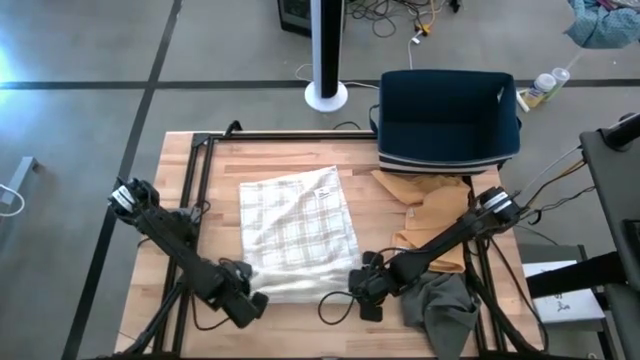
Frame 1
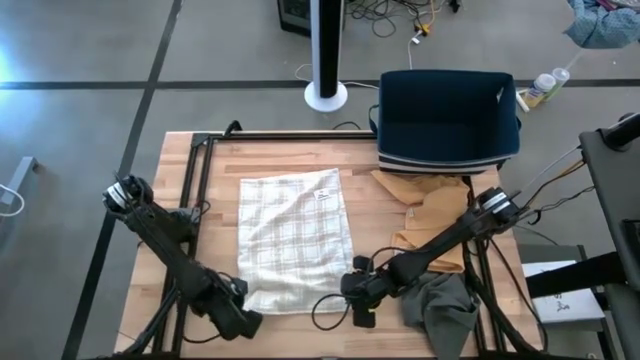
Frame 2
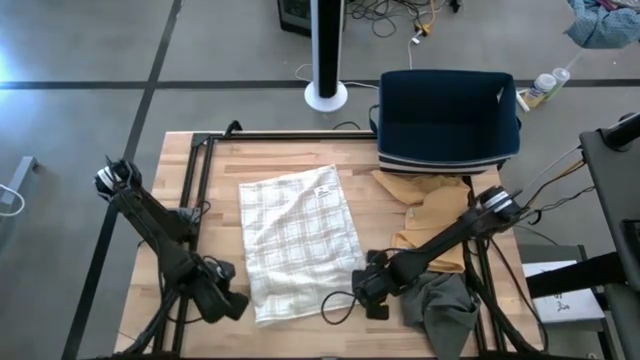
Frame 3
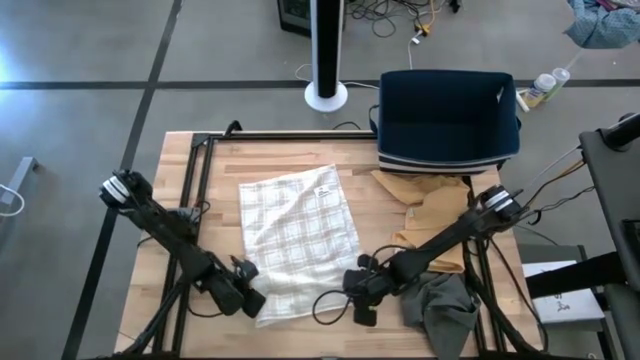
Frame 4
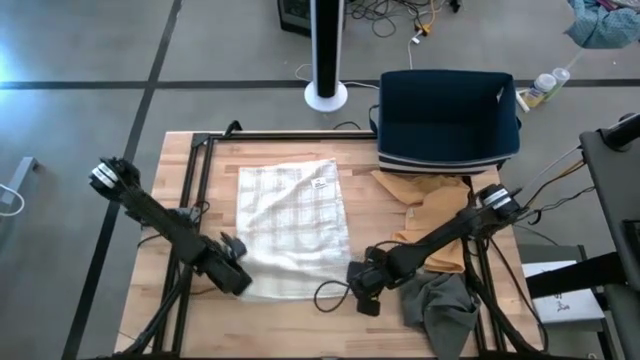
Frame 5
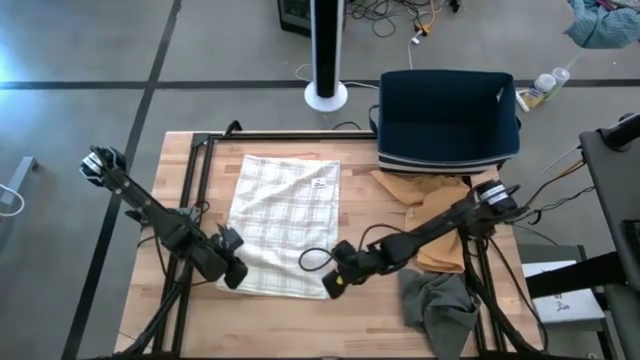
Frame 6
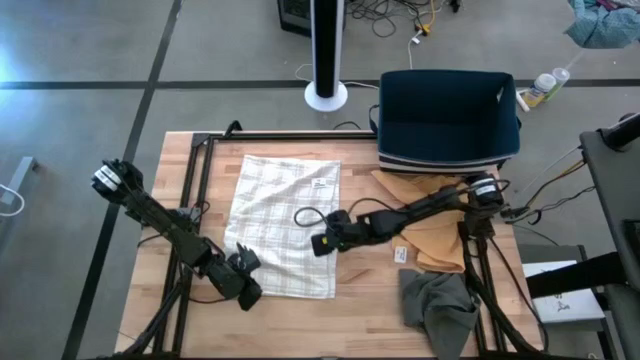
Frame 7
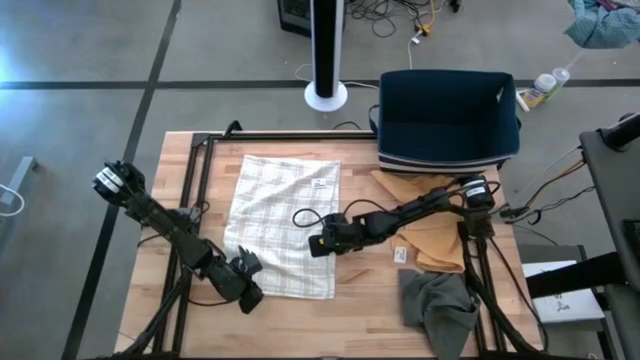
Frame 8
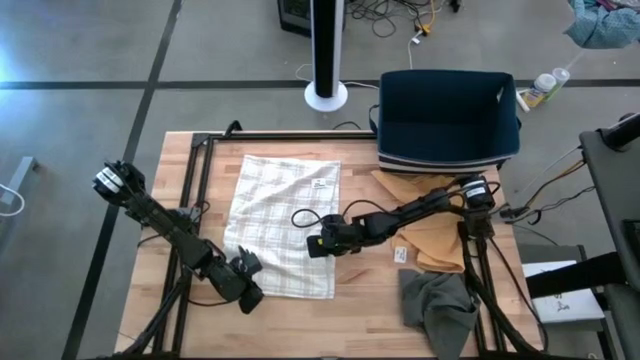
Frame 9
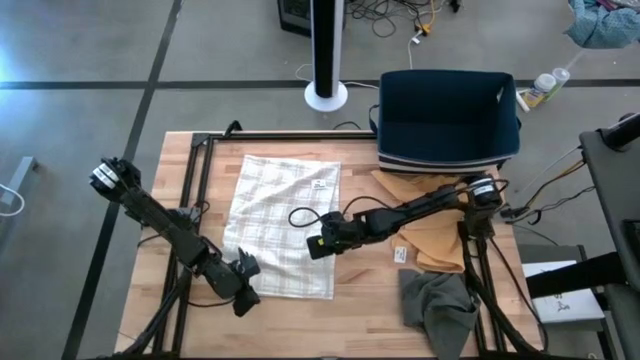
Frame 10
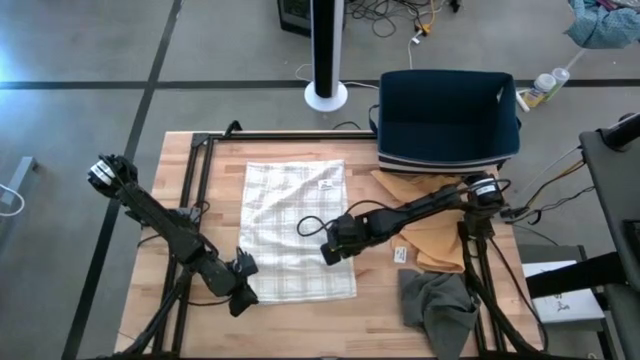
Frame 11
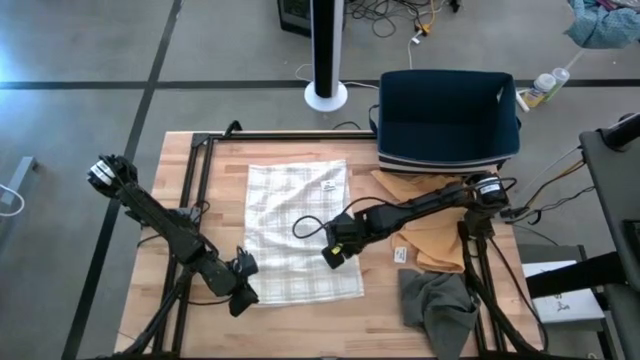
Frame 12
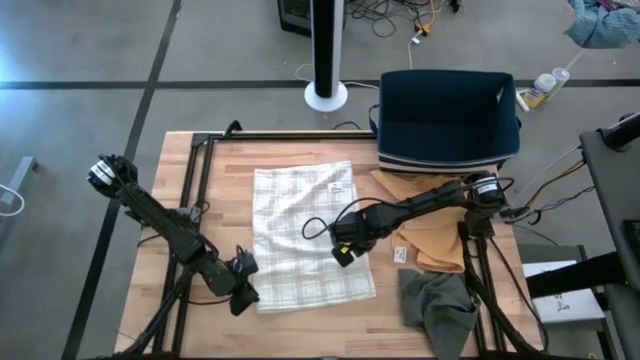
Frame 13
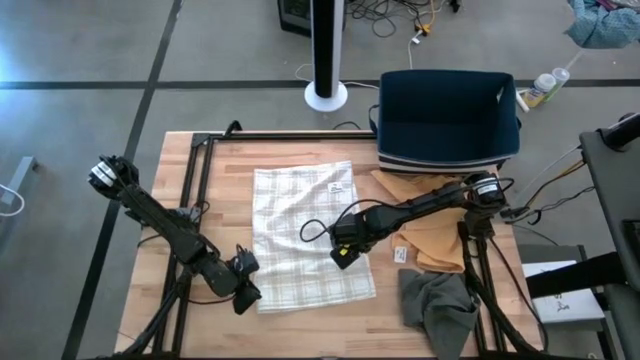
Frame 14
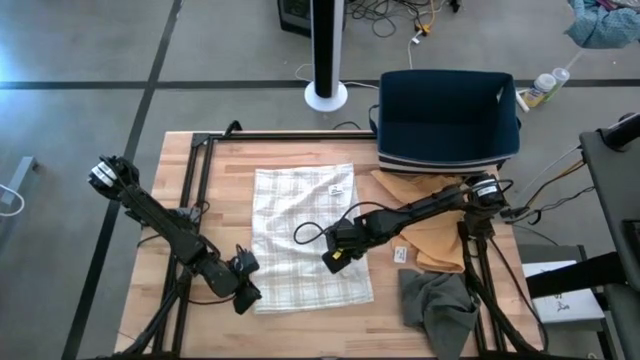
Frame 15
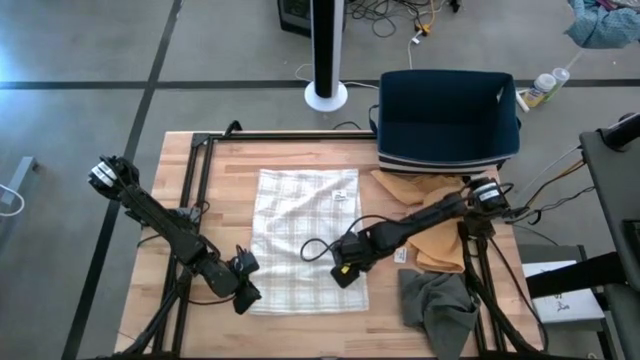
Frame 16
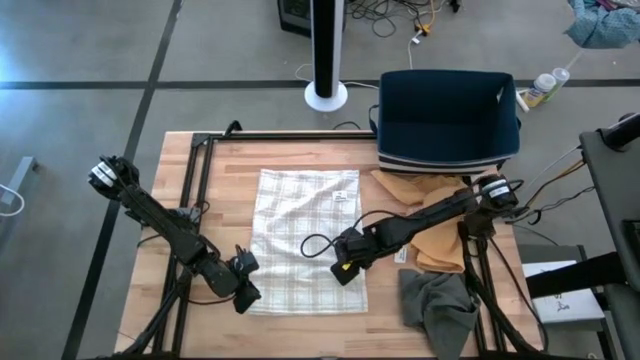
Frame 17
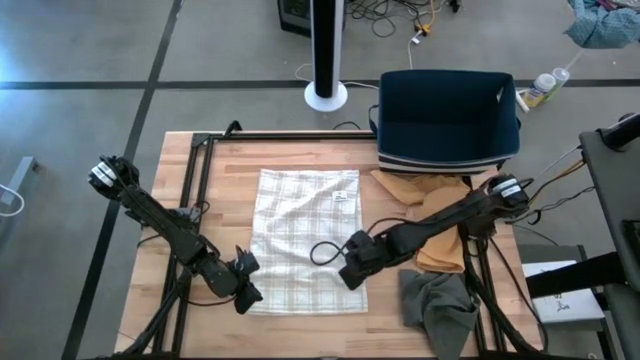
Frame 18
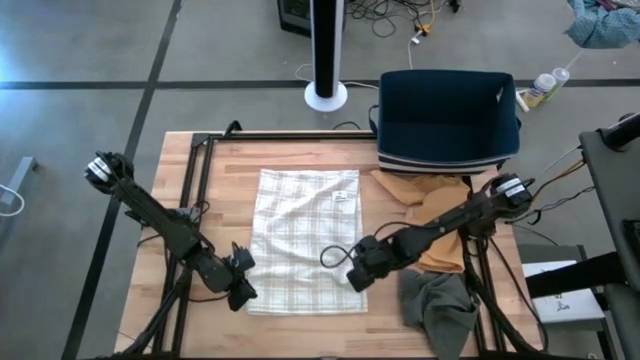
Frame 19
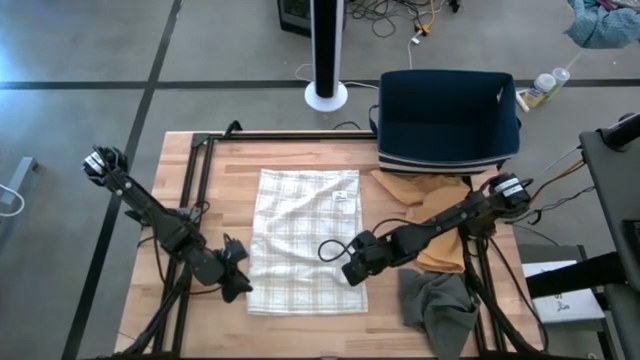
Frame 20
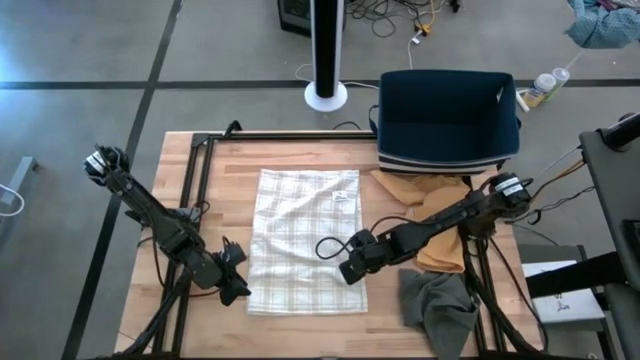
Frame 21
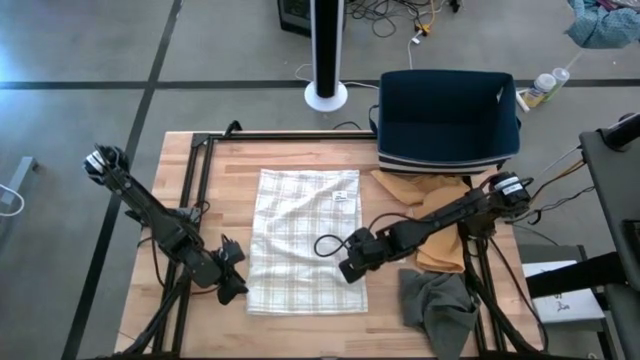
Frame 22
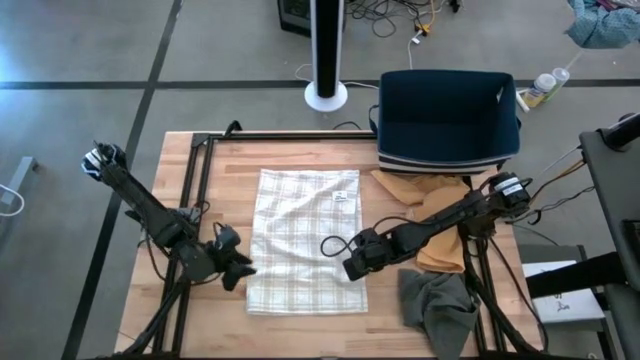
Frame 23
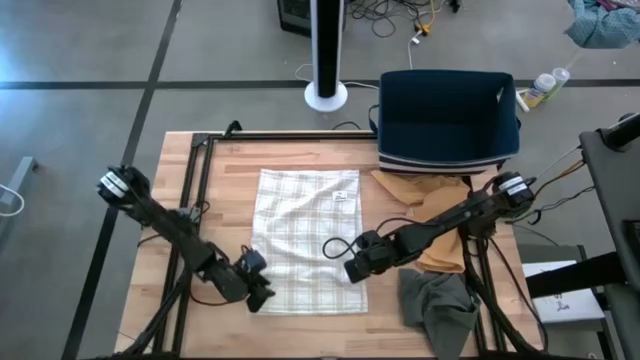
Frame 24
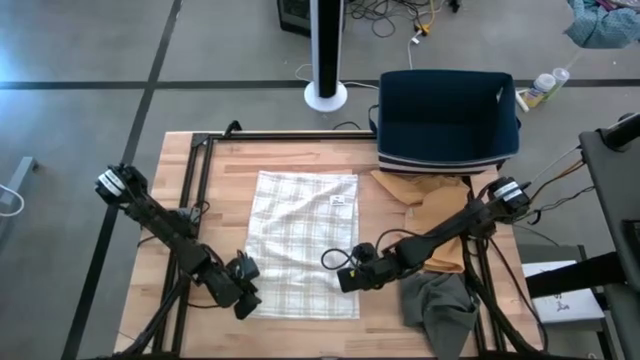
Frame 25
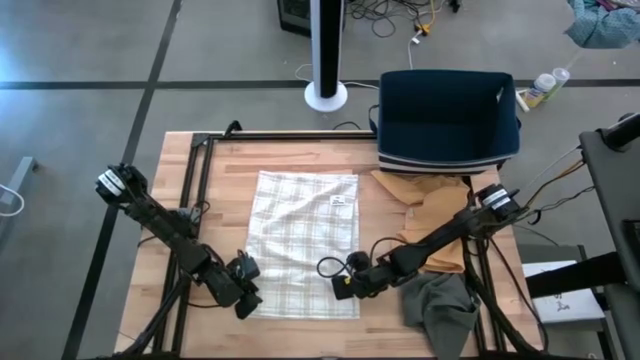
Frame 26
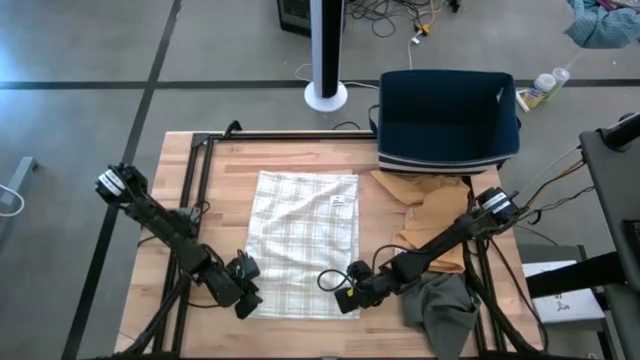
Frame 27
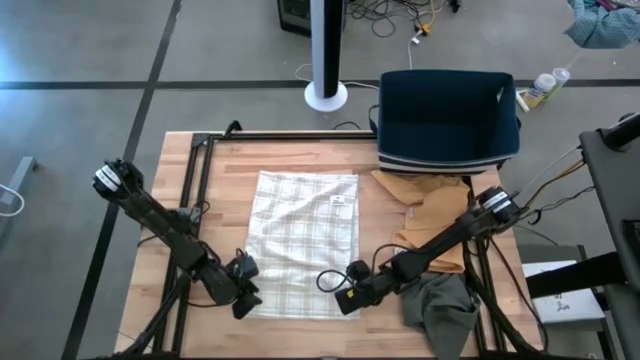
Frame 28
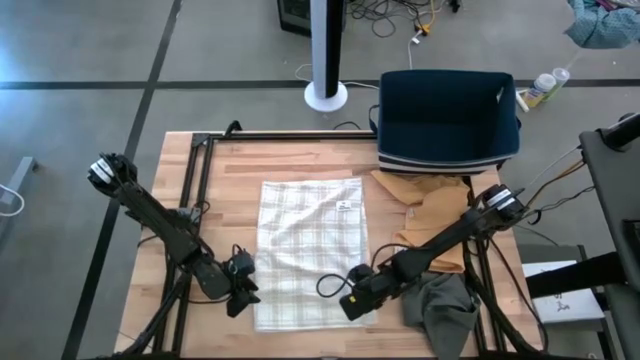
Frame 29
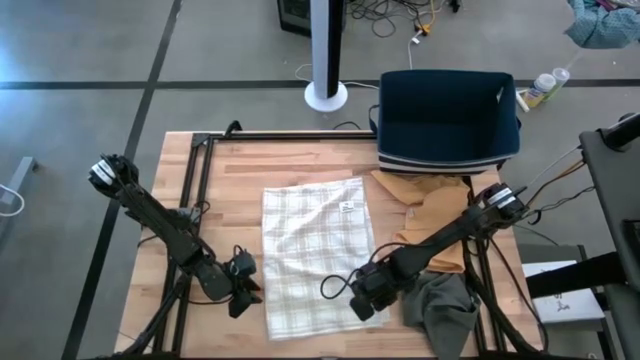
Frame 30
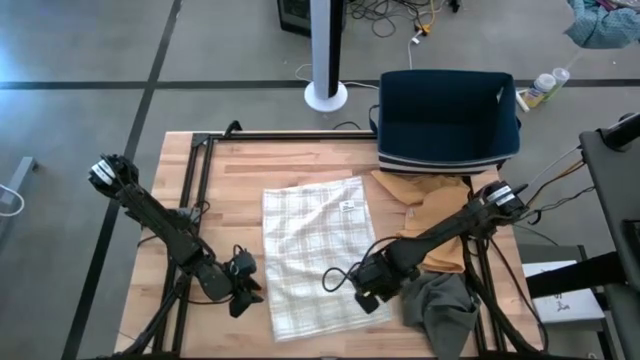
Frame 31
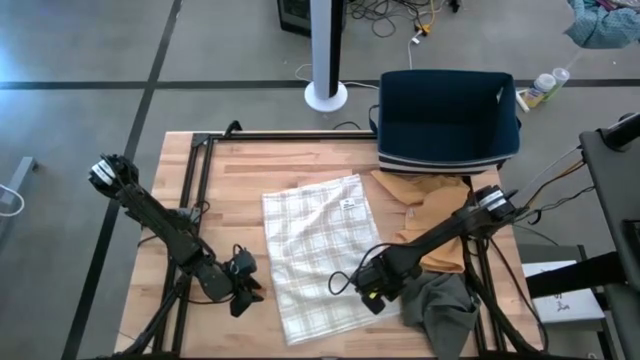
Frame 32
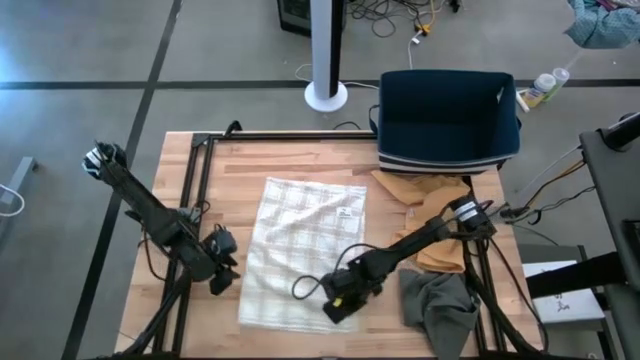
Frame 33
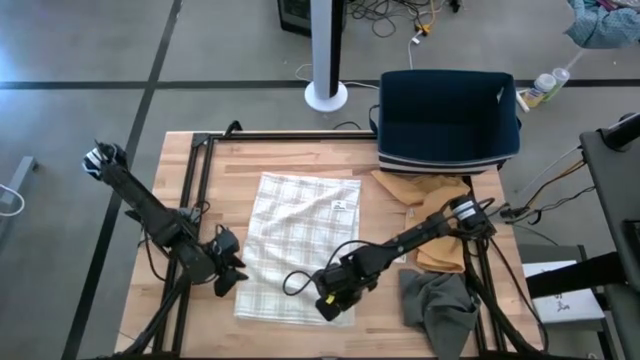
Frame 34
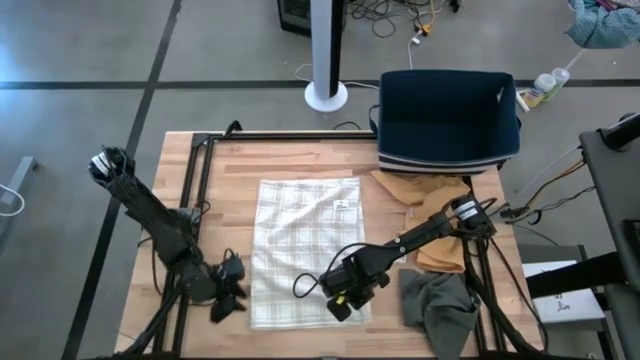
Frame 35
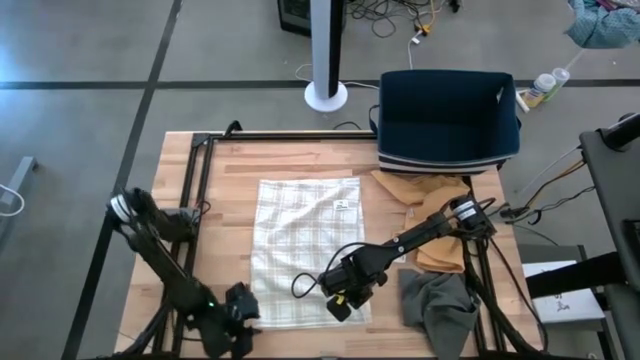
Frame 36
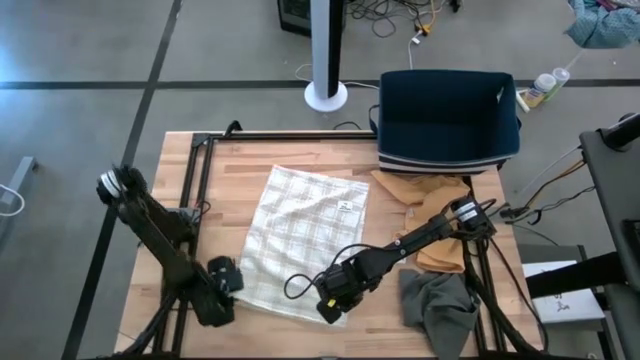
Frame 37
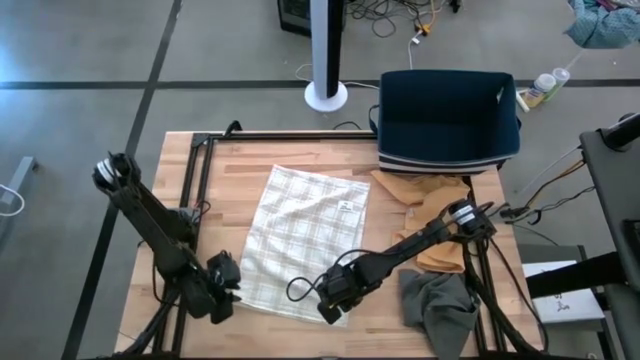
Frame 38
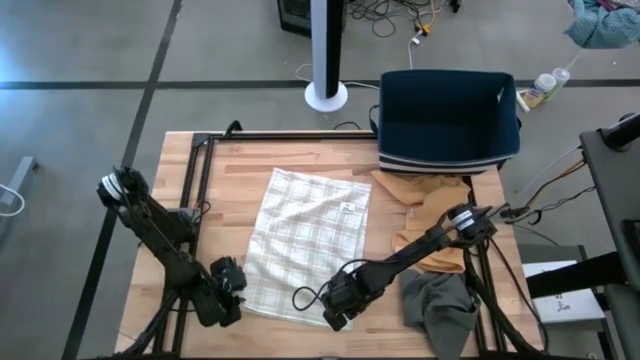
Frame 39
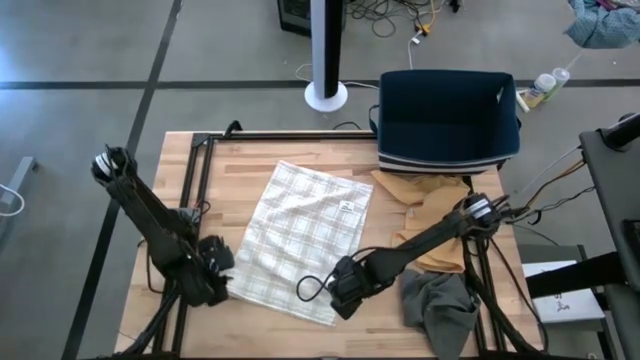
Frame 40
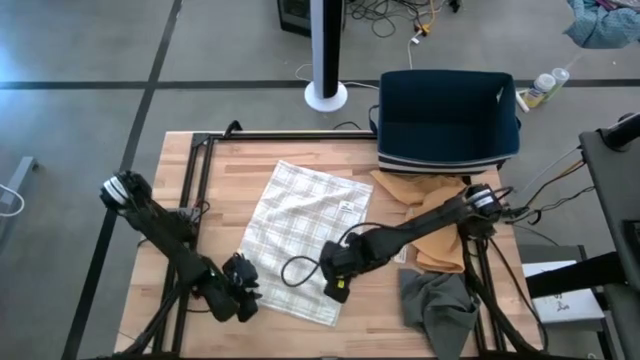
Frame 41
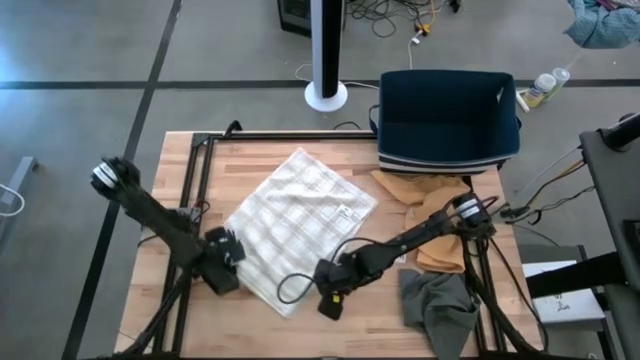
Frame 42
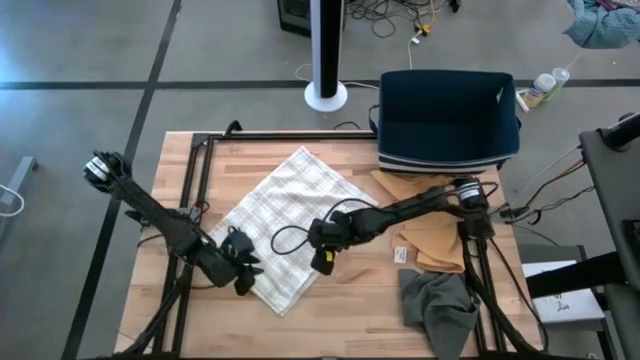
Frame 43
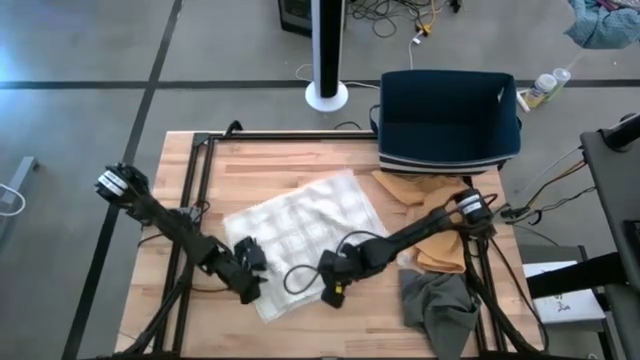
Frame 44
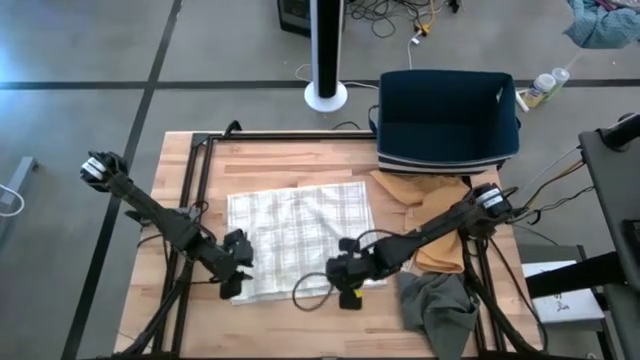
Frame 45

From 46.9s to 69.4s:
Task: Fold towel
Fold the white towel
